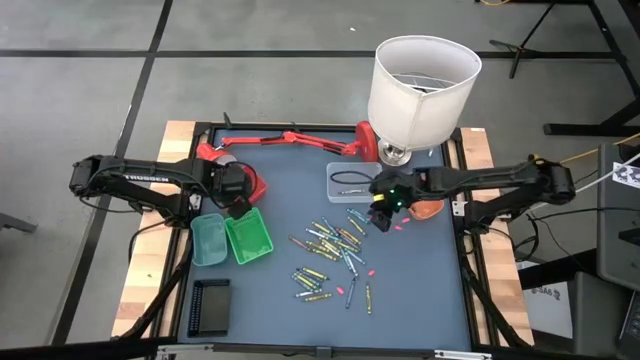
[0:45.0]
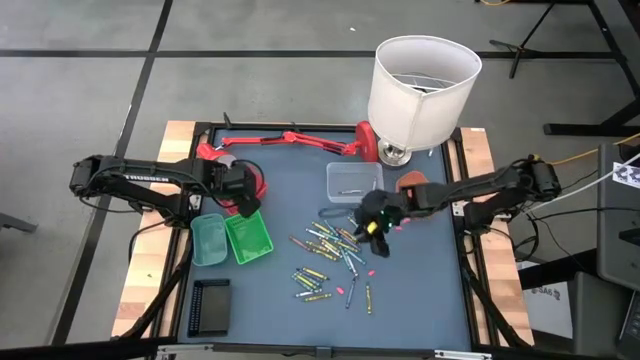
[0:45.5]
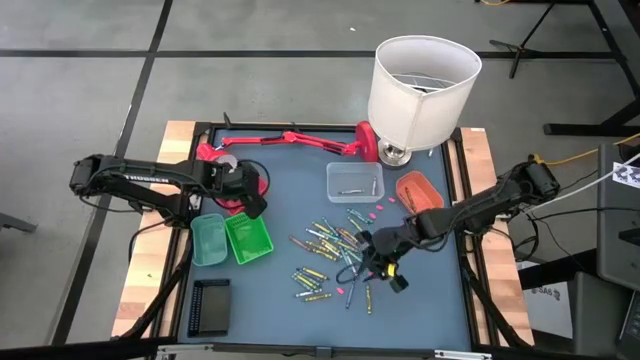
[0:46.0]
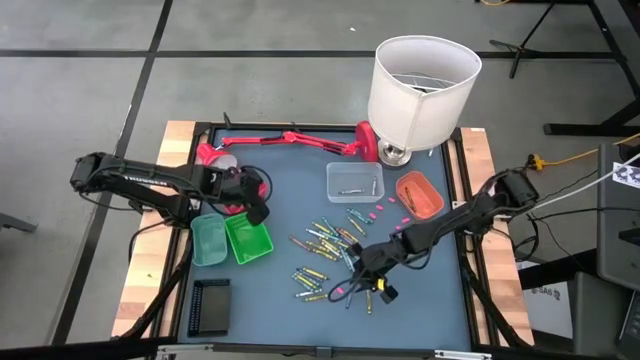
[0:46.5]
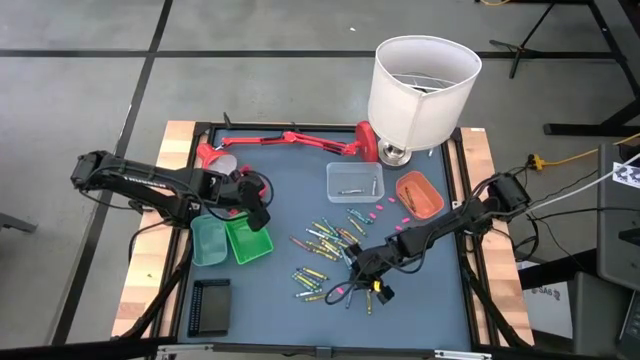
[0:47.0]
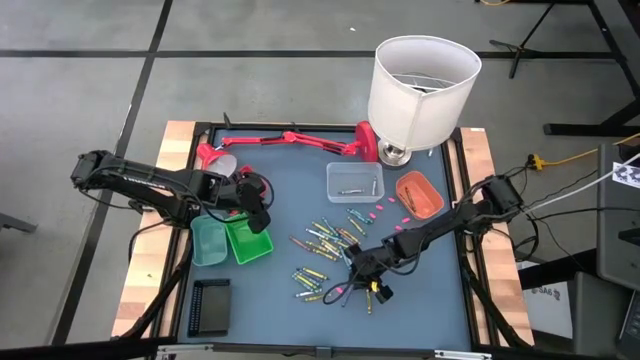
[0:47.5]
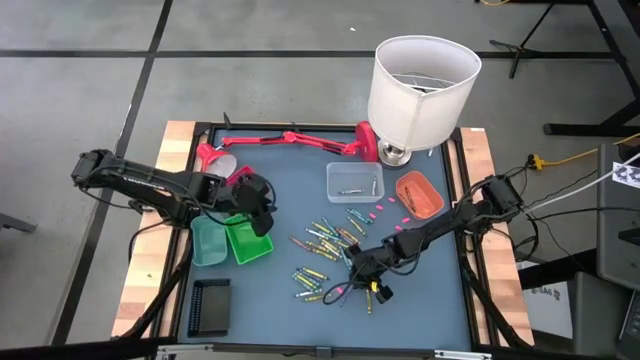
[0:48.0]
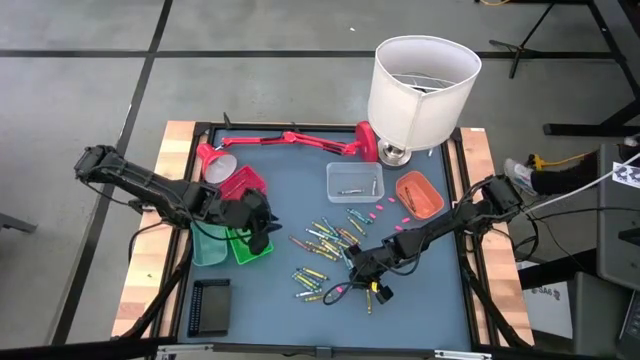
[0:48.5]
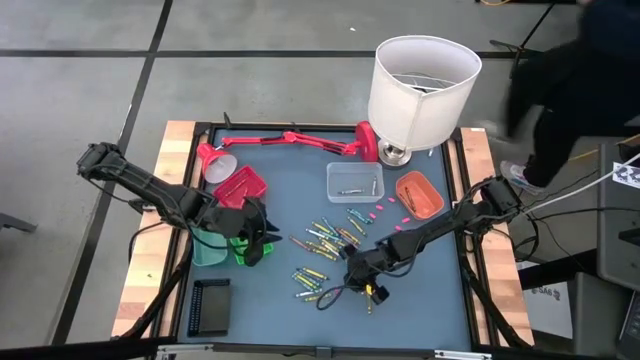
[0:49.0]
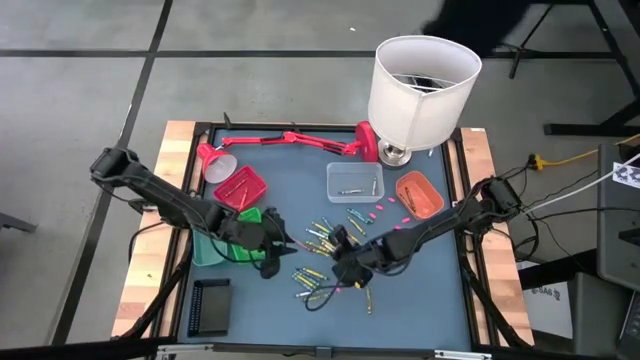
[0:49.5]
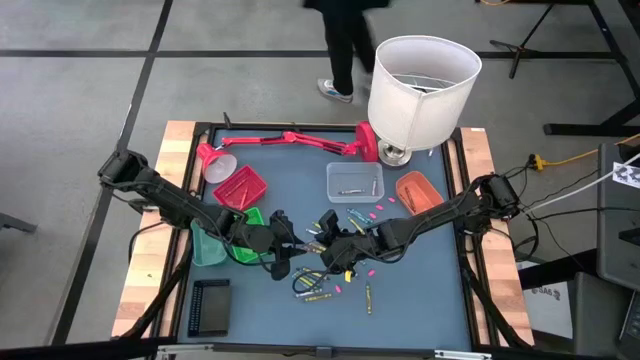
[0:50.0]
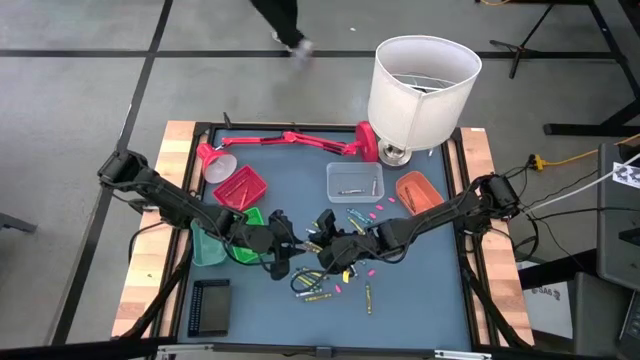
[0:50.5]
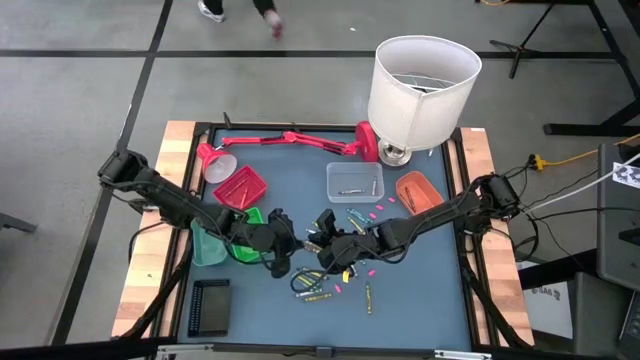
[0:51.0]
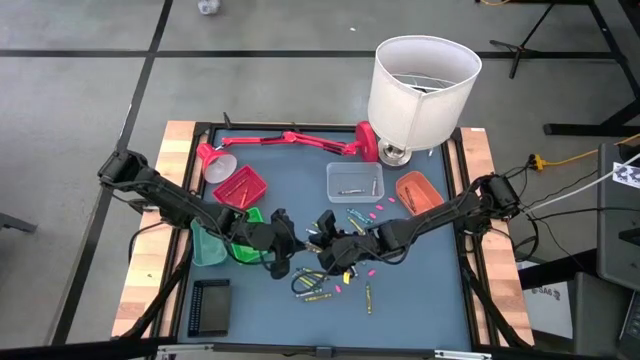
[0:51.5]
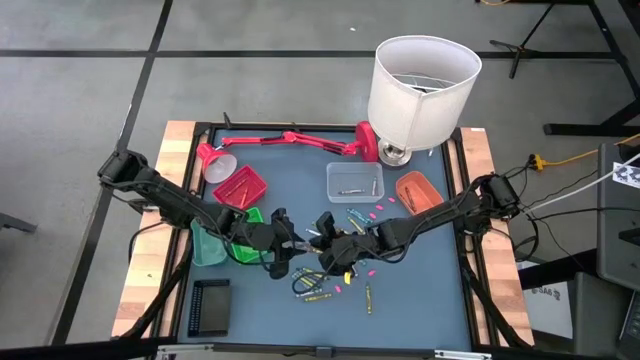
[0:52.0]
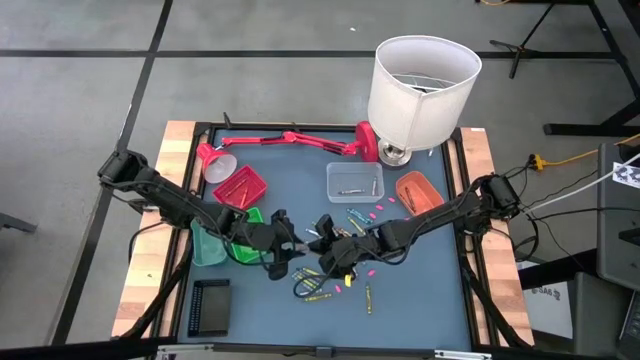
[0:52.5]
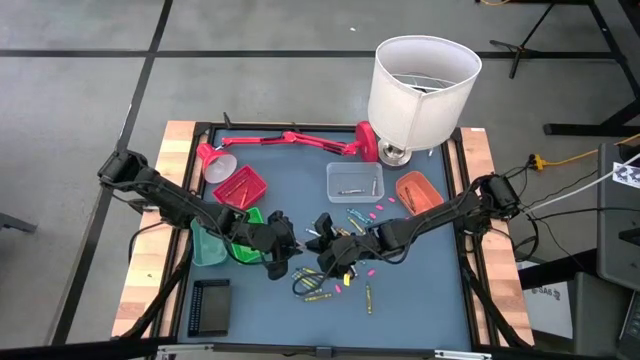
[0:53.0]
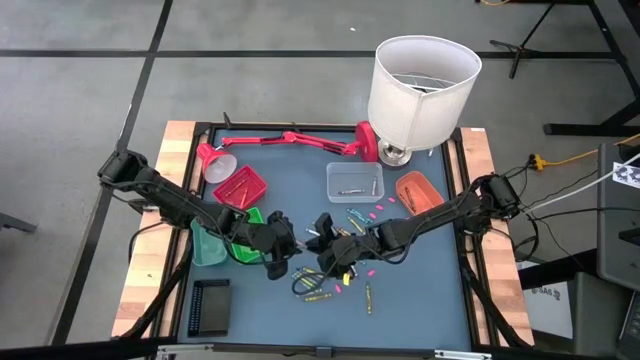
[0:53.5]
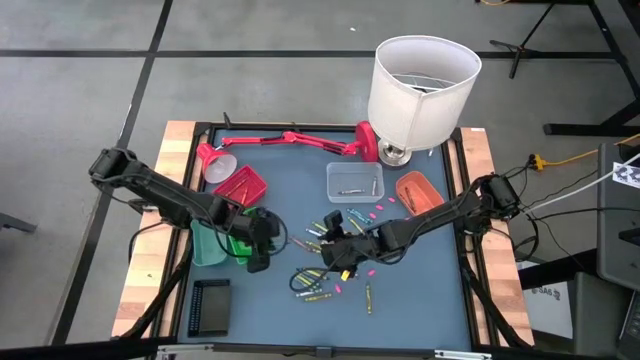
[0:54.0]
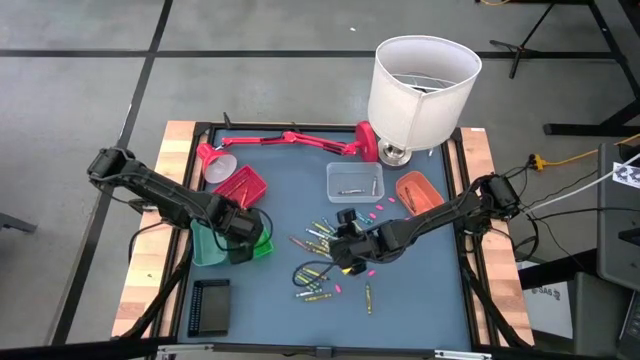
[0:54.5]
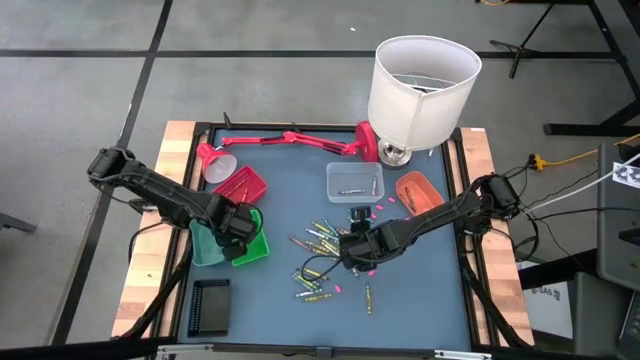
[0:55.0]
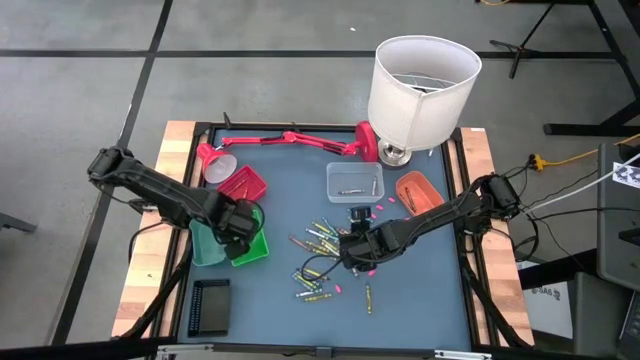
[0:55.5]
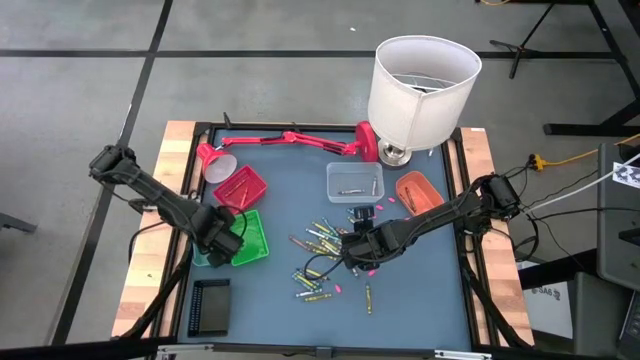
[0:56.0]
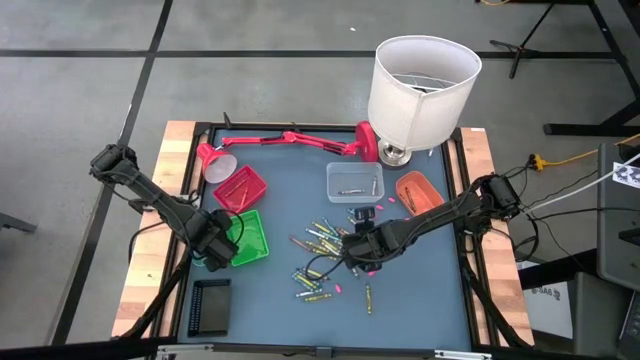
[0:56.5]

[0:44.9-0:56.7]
Task: Sort crayons
Put the blue crayon into the blue bin

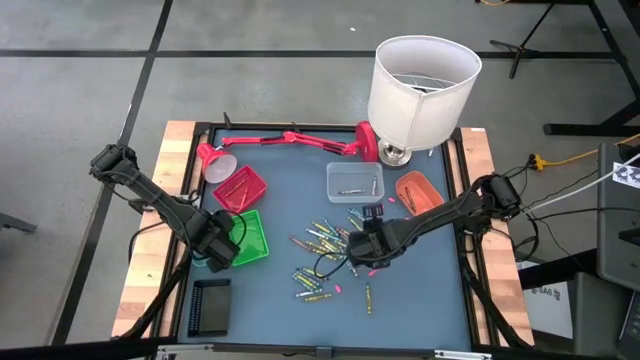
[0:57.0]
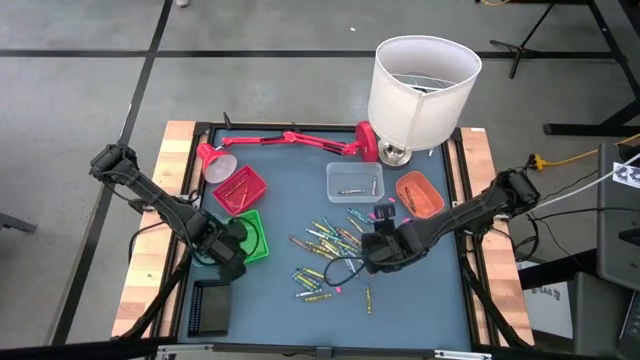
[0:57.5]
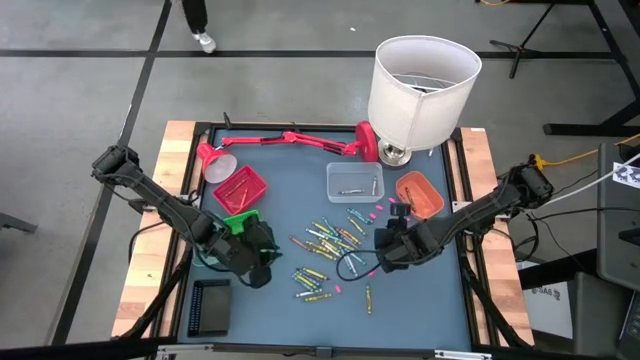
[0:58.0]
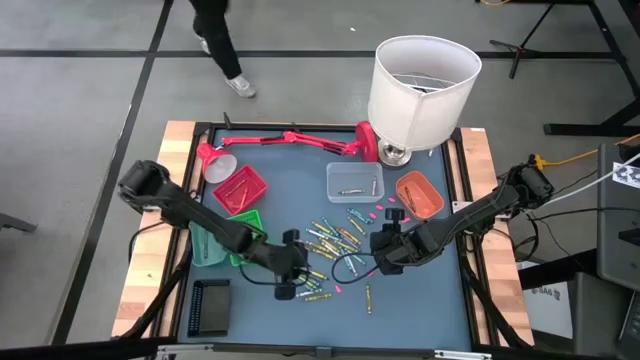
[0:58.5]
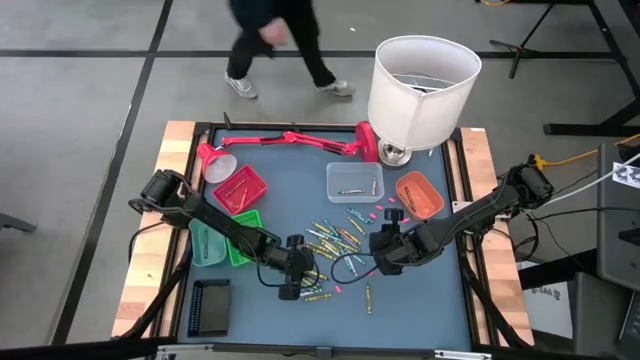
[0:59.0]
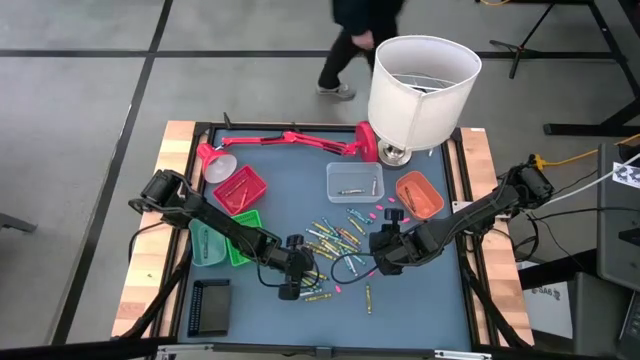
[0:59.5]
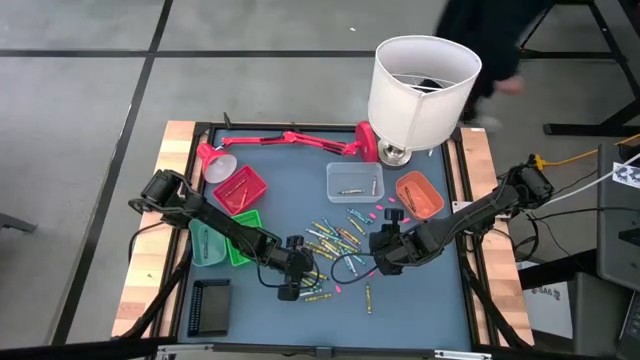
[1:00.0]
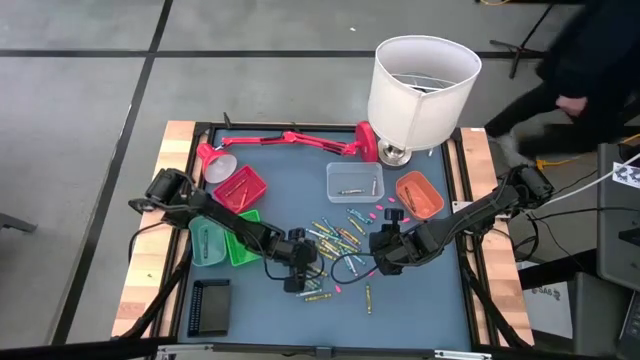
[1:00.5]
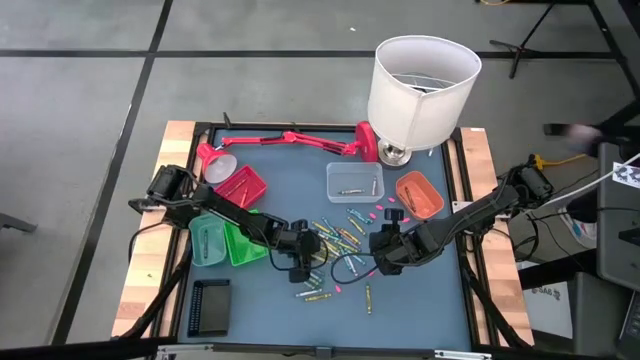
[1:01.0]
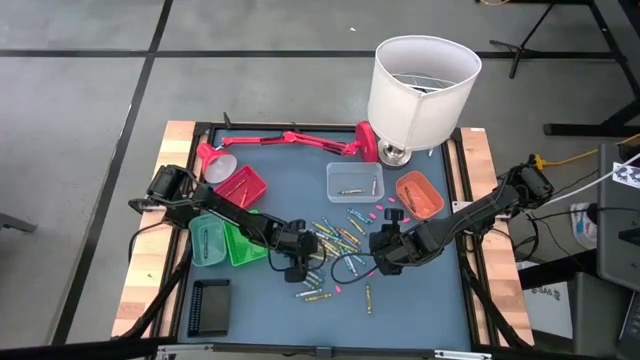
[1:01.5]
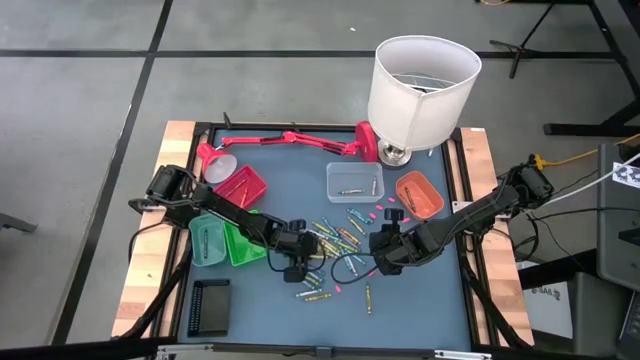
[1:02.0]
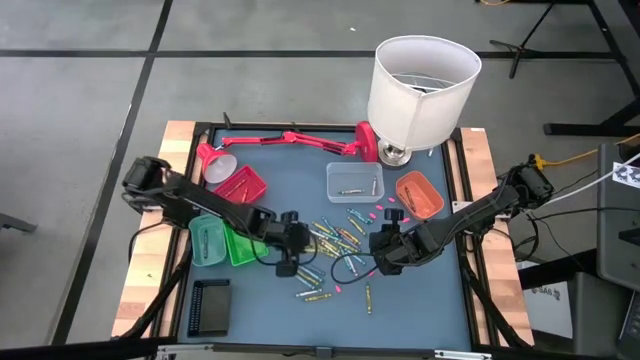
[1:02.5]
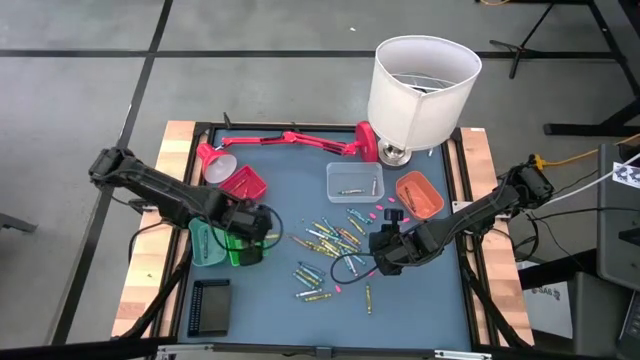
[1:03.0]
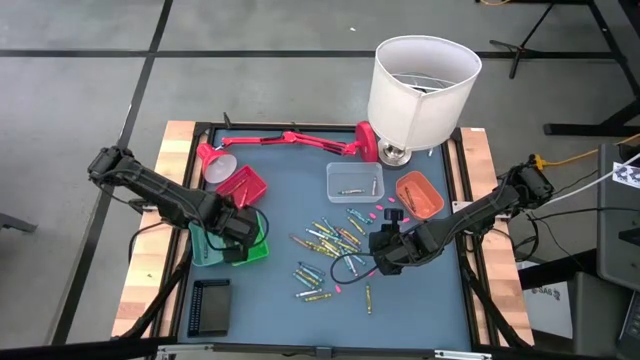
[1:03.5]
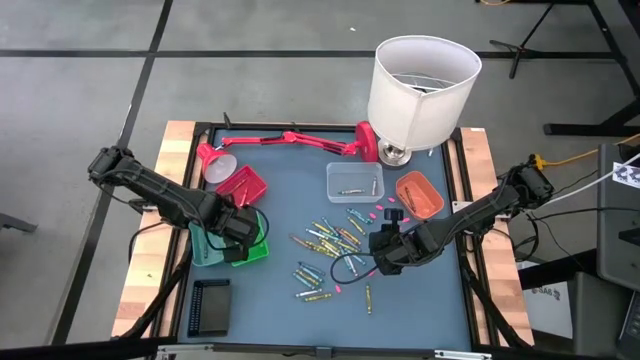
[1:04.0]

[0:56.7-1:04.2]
Put the green crayon into the green bin

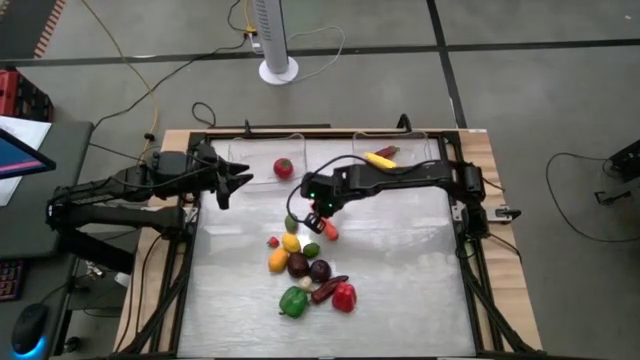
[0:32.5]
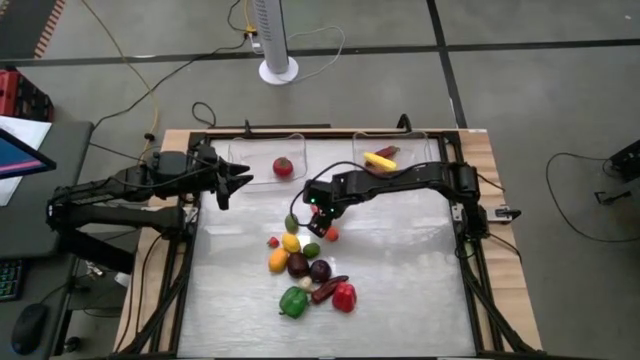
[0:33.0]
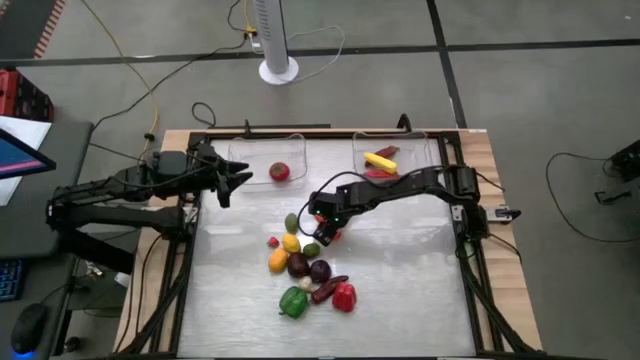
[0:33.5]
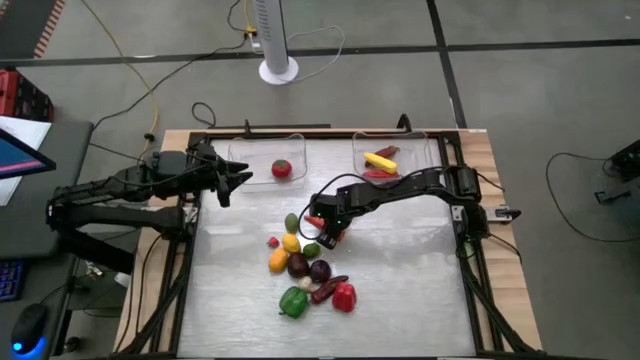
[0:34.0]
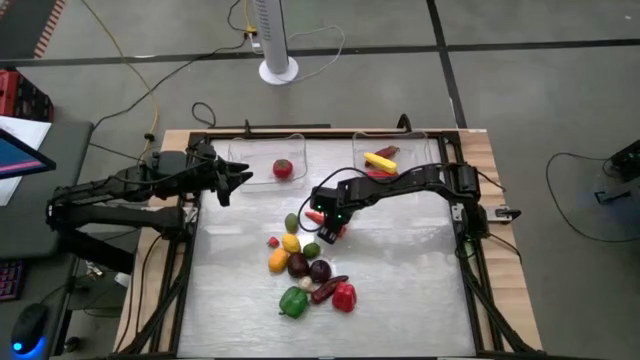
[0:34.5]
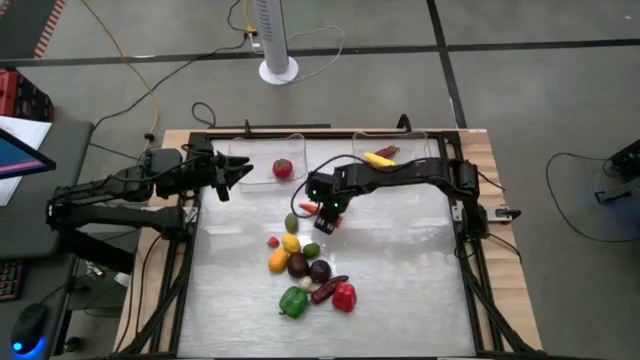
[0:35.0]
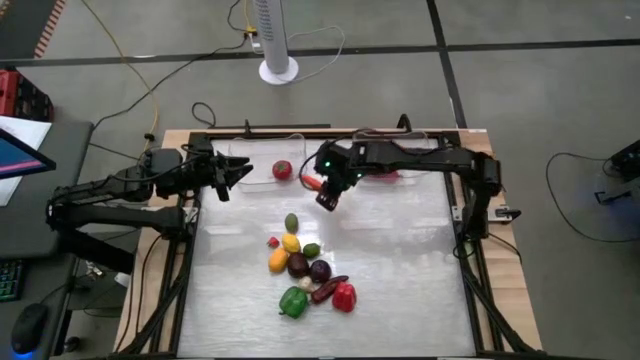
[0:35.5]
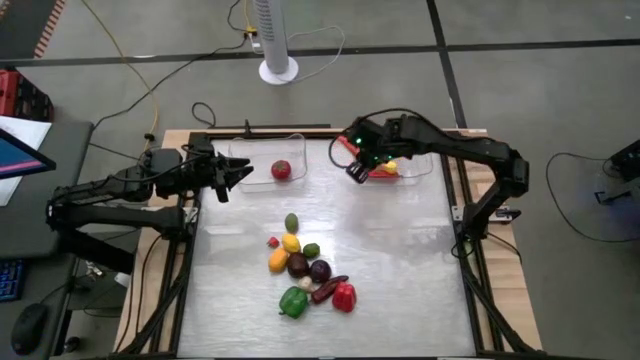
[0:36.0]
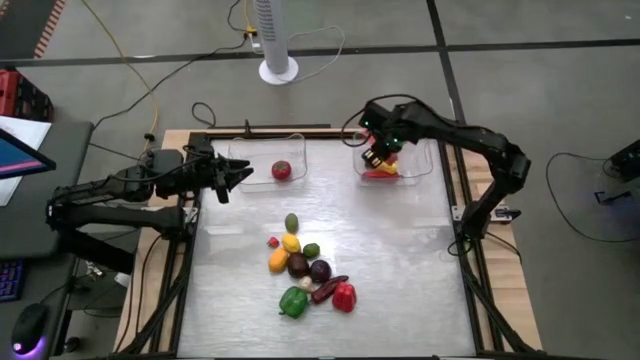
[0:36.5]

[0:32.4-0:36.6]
Task: Sort produce into baskets
Put the orange carrot into the right transparent bin
